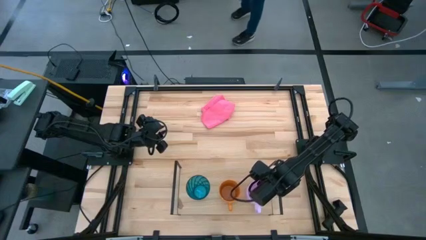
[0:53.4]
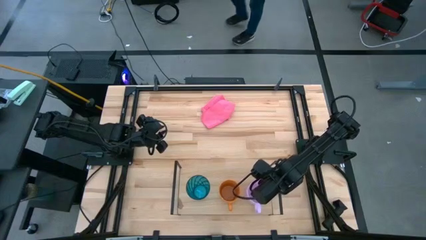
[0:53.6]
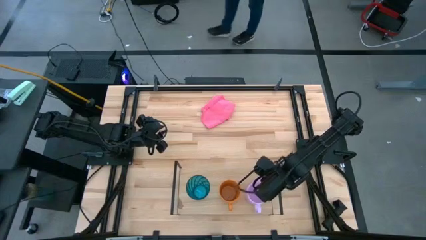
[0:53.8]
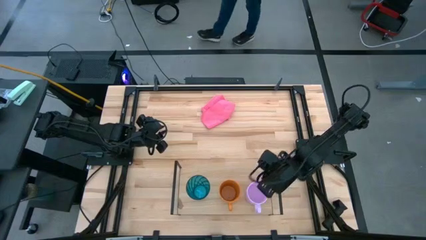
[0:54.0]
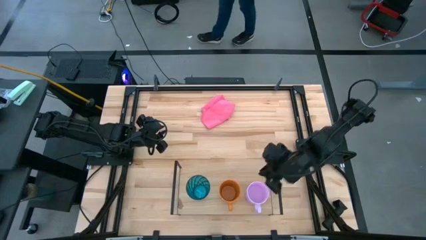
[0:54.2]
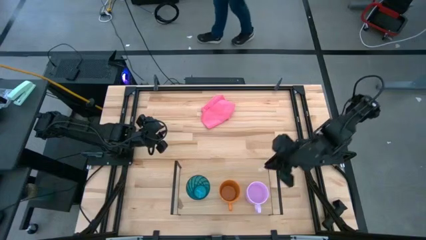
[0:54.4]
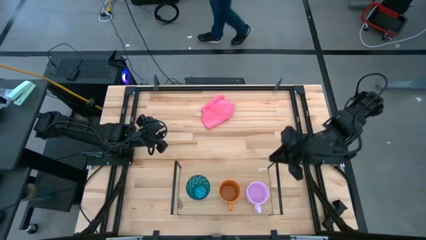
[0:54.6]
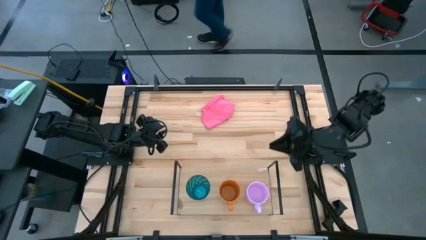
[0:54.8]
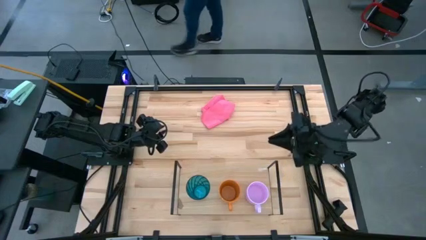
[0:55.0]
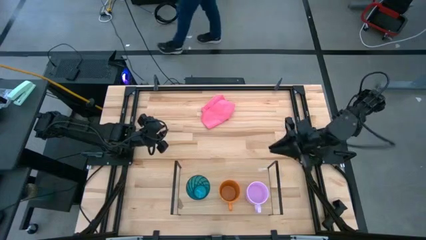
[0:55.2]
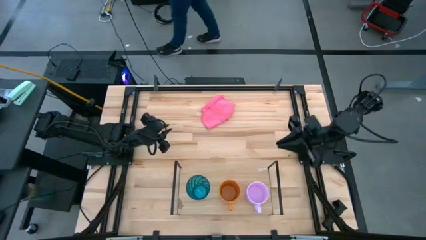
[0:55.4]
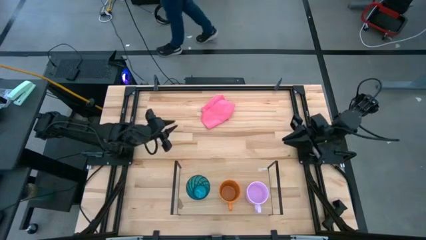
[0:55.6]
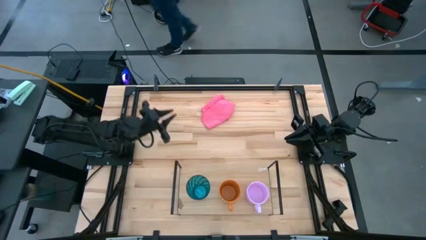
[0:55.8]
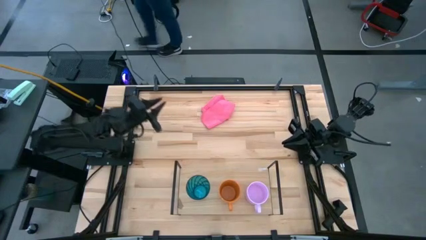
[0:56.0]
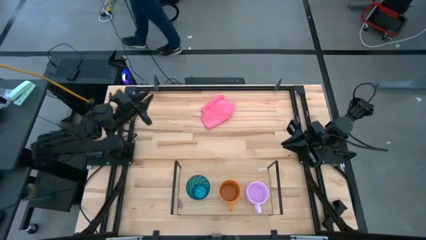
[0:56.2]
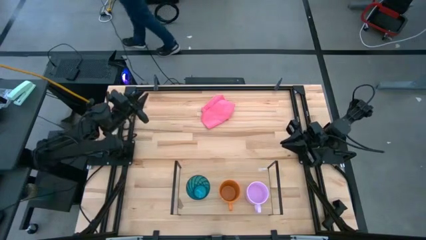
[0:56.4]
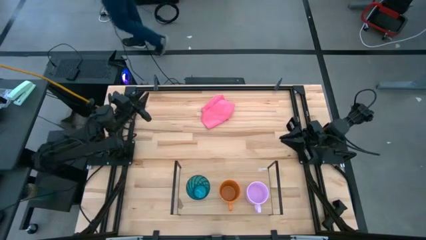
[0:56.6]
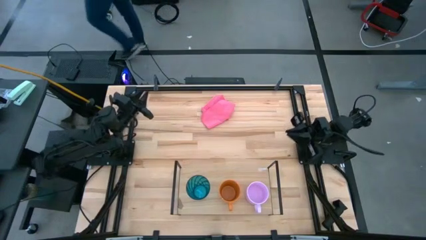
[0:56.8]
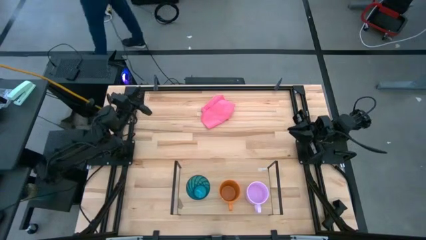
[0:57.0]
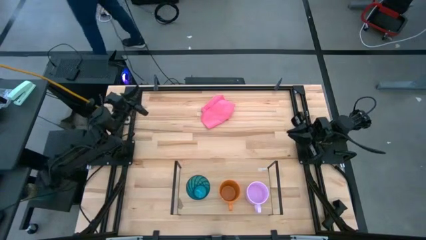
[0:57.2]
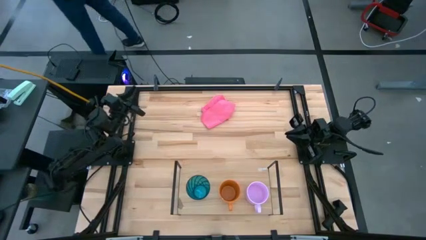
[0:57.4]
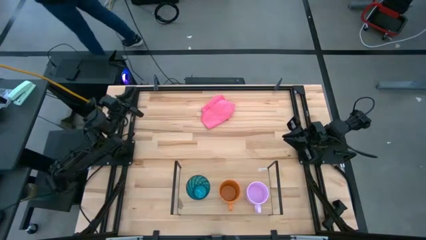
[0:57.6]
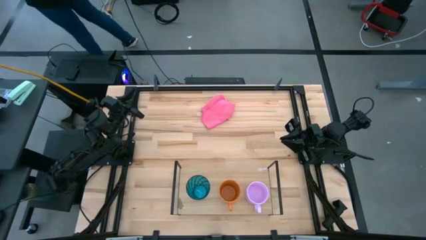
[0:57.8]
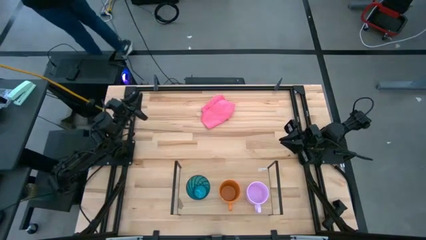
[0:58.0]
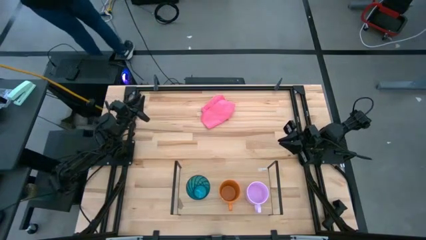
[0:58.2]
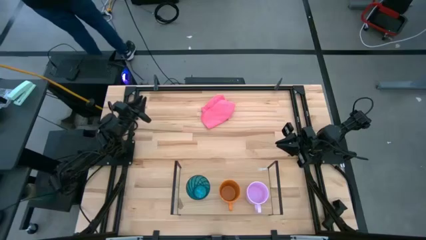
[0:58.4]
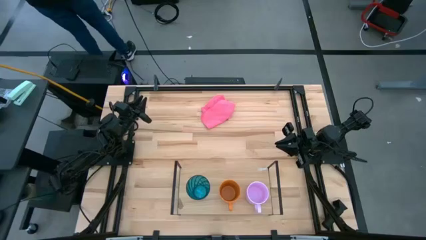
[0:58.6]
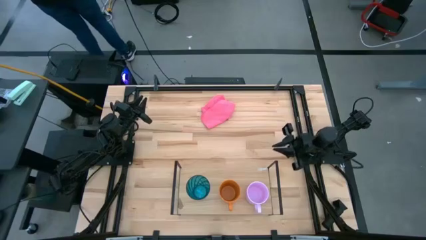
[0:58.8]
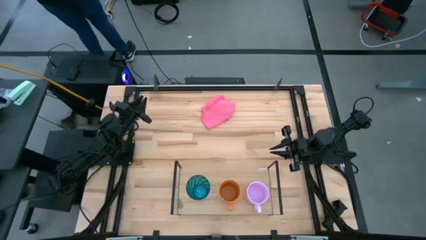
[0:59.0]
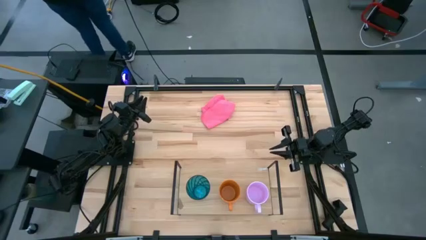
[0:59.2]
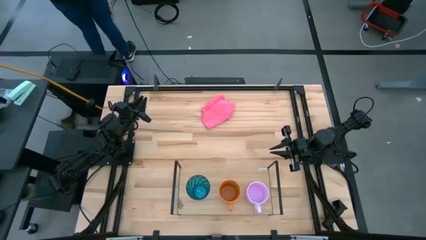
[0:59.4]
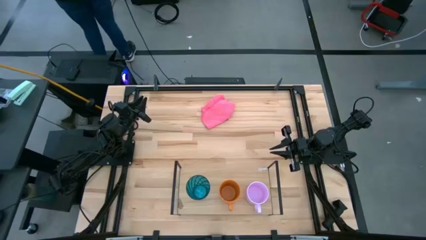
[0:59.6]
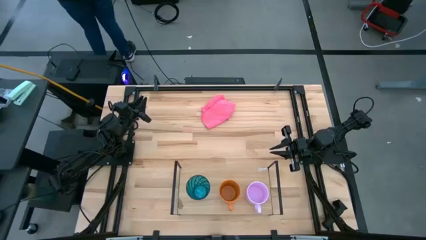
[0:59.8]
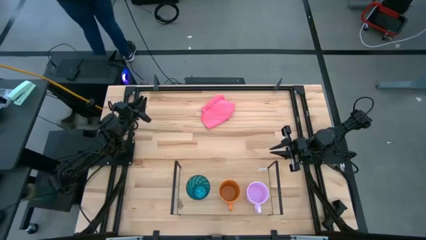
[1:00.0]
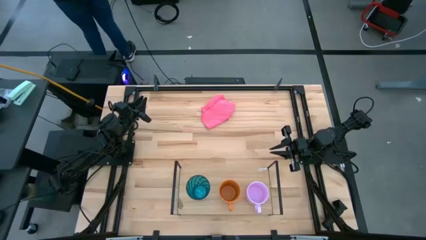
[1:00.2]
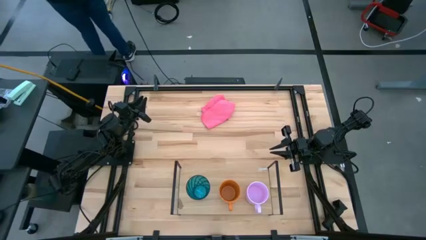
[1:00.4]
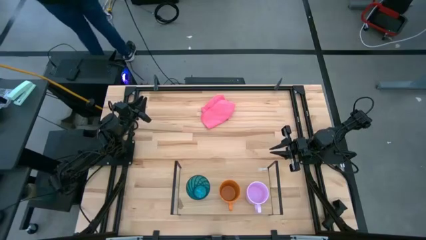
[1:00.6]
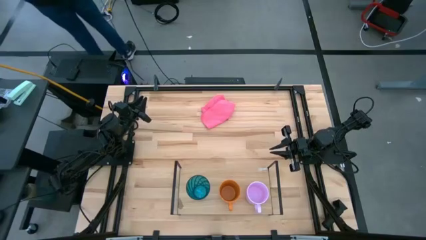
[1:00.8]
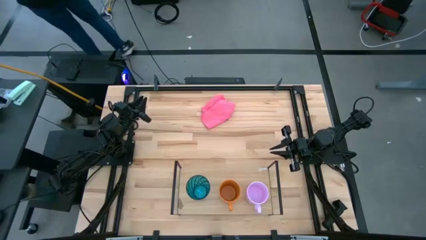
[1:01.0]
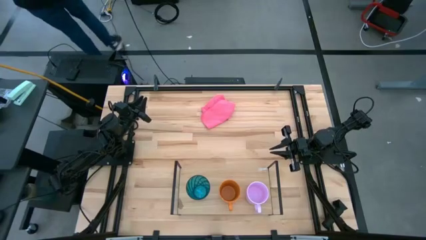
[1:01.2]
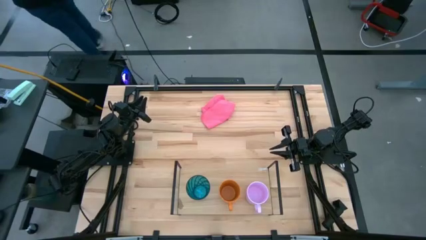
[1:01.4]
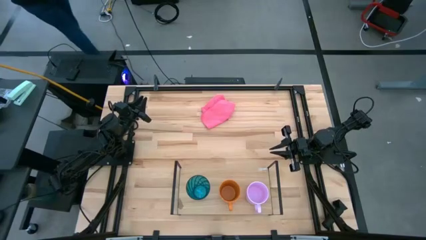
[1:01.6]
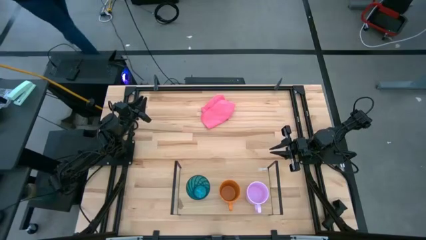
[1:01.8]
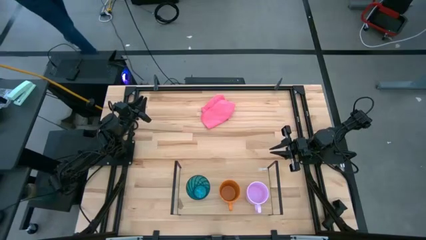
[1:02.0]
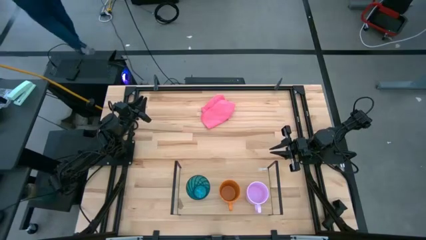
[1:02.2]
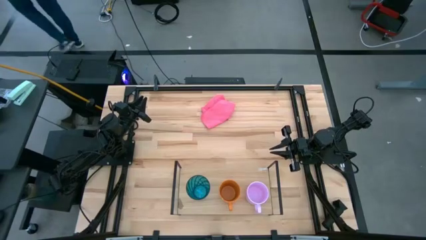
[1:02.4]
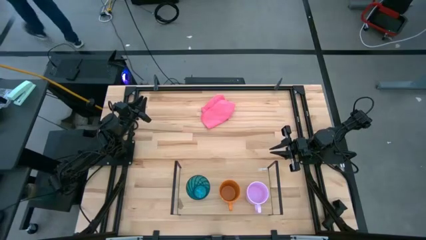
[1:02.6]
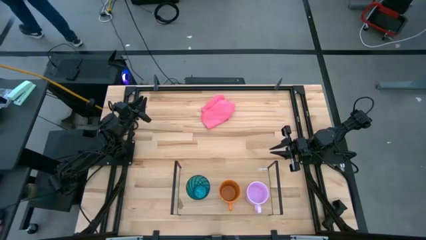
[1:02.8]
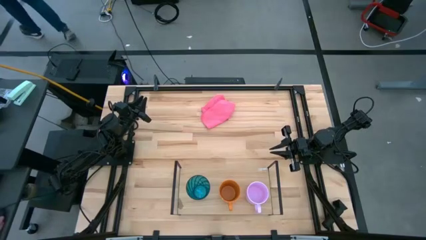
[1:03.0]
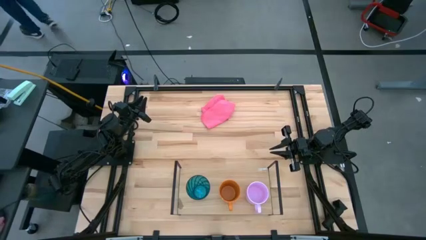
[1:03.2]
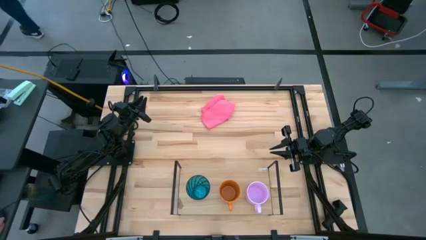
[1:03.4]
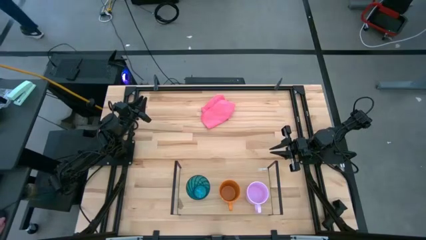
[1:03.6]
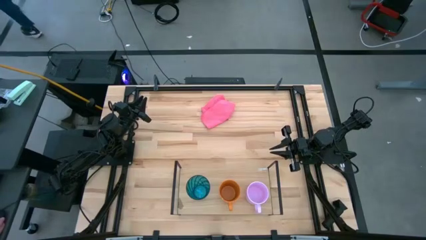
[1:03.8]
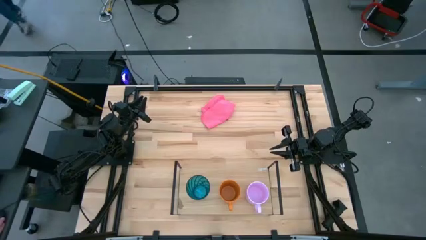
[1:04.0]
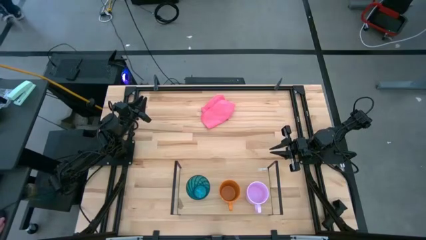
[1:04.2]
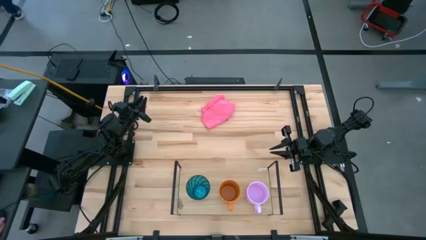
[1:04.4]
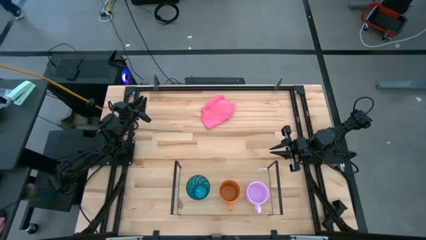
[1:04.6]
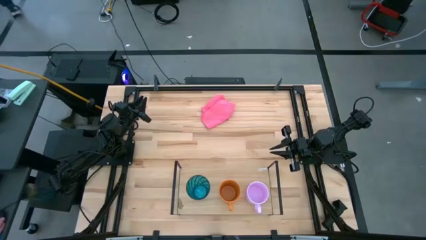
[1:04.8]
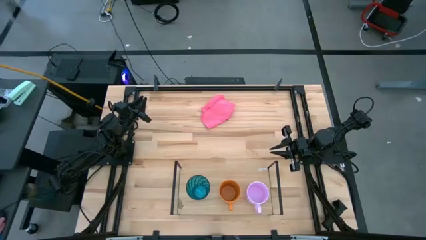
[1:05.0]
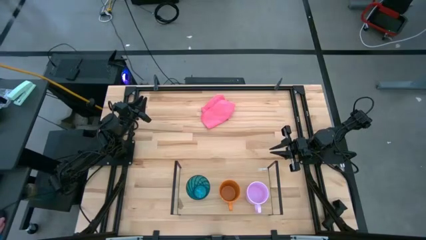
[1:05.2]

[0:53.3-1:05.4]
Task: Stack small to large cups/mugs on shelf
Return to Home Position
